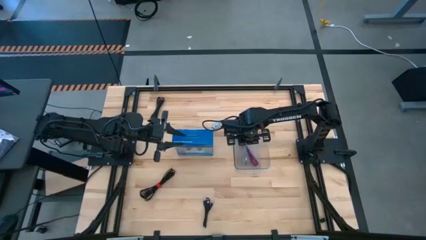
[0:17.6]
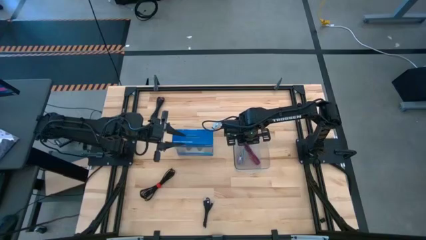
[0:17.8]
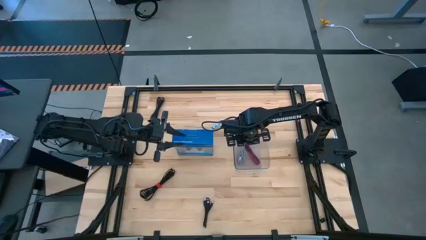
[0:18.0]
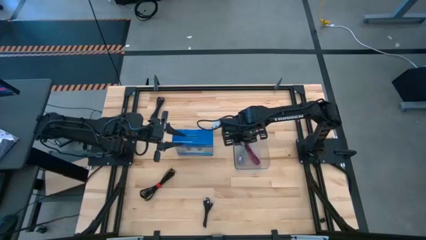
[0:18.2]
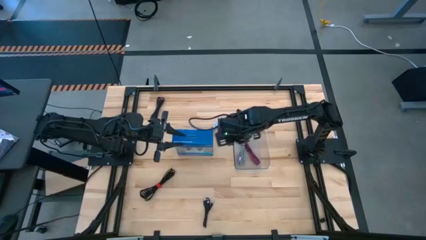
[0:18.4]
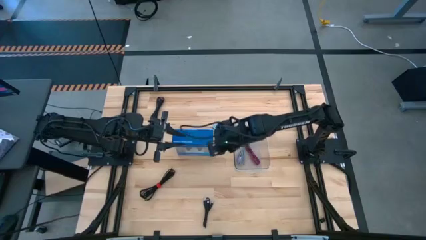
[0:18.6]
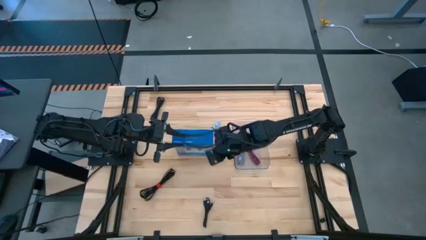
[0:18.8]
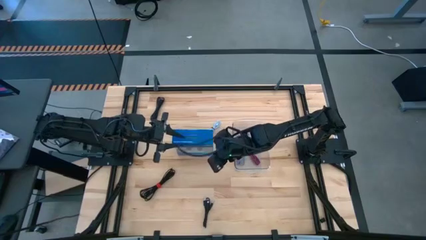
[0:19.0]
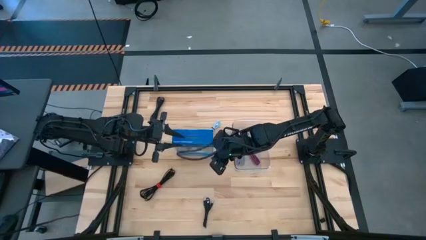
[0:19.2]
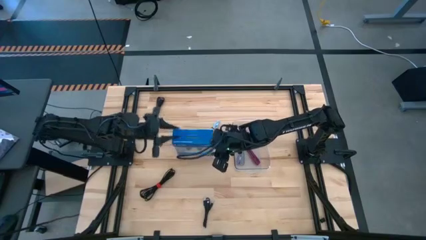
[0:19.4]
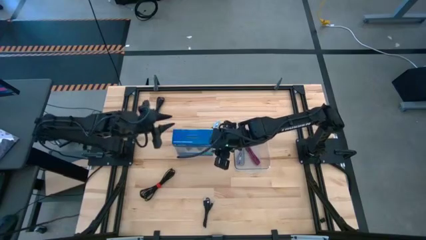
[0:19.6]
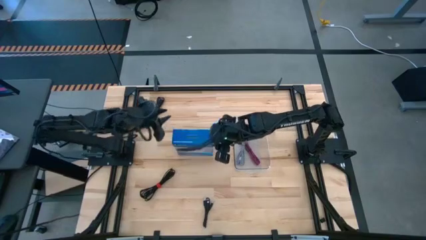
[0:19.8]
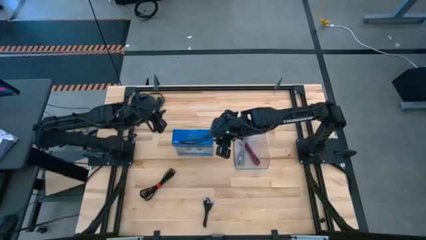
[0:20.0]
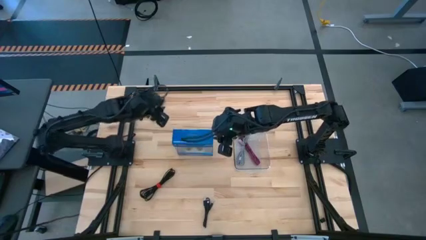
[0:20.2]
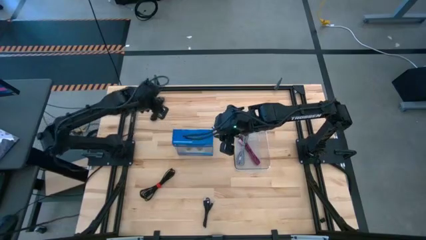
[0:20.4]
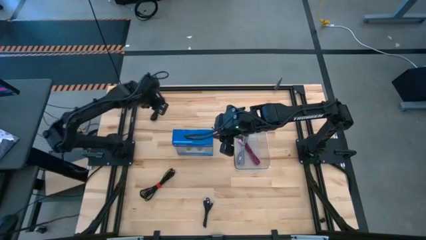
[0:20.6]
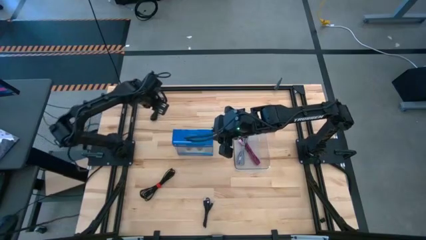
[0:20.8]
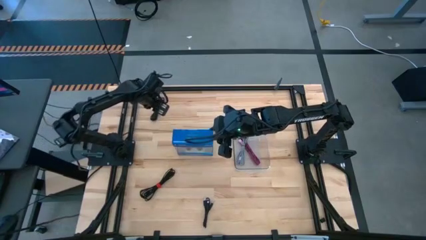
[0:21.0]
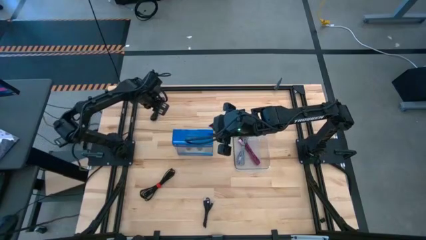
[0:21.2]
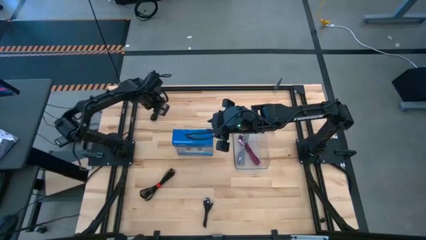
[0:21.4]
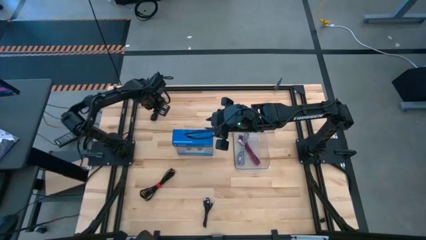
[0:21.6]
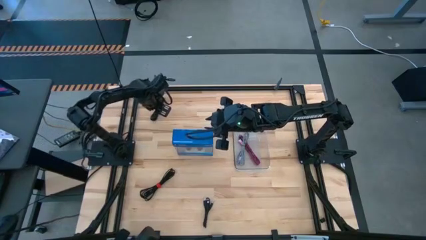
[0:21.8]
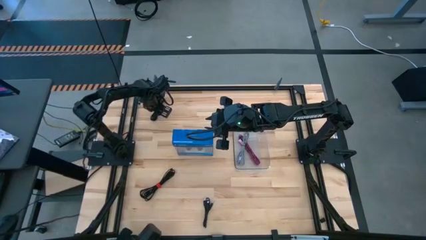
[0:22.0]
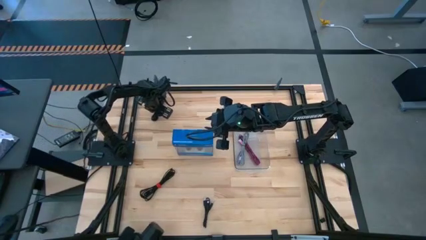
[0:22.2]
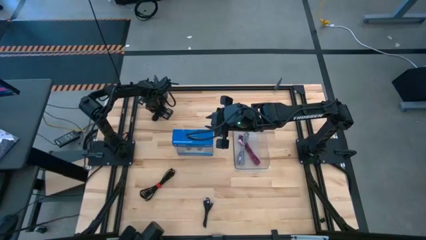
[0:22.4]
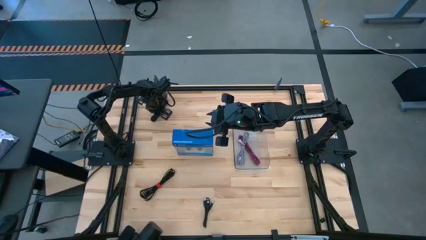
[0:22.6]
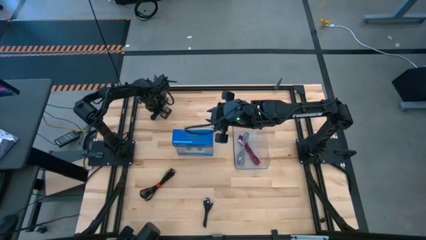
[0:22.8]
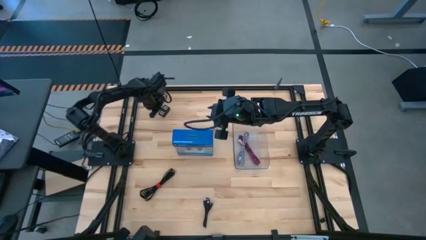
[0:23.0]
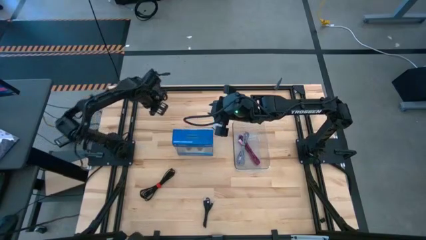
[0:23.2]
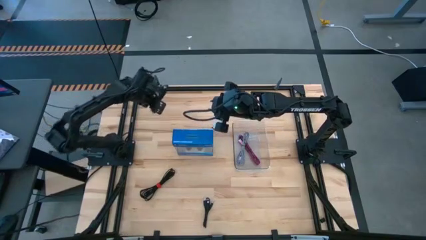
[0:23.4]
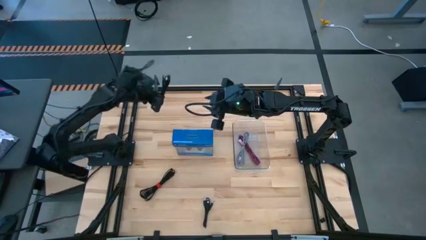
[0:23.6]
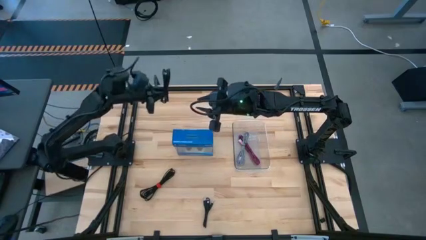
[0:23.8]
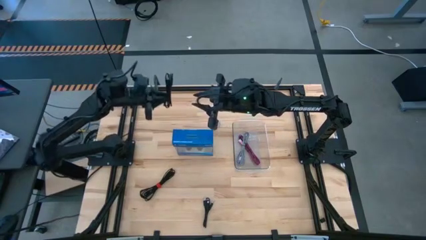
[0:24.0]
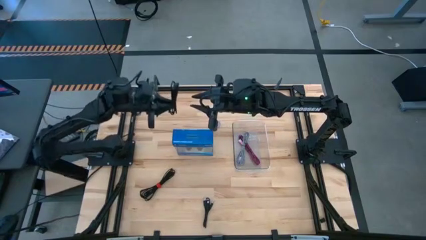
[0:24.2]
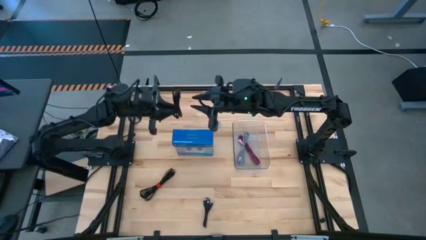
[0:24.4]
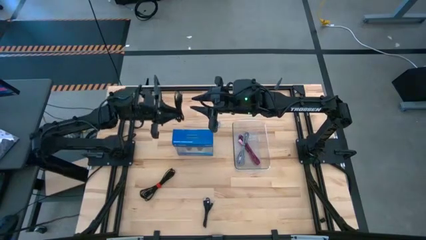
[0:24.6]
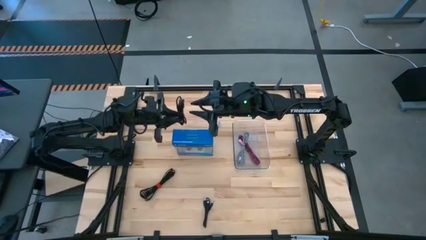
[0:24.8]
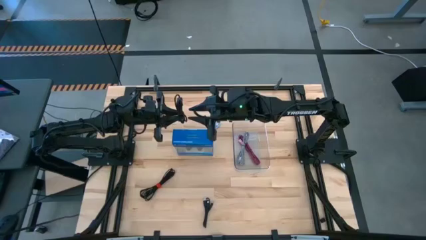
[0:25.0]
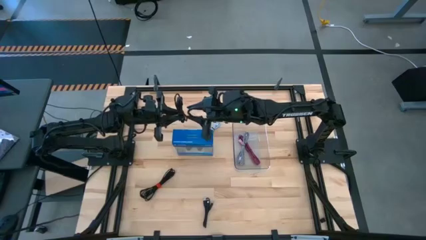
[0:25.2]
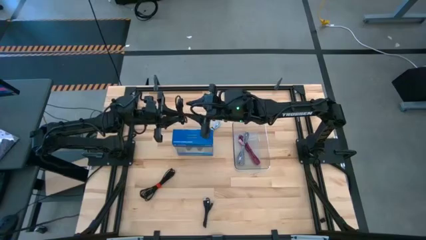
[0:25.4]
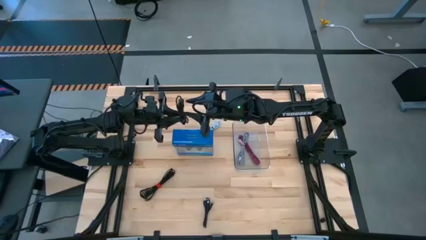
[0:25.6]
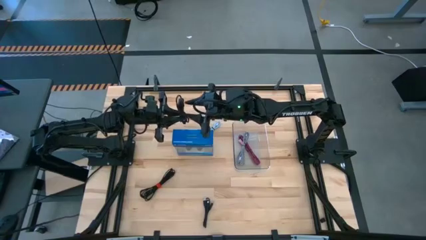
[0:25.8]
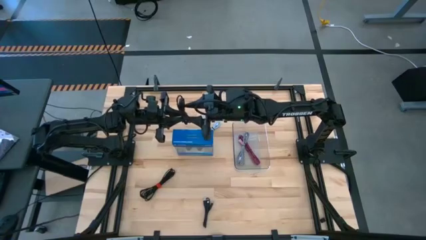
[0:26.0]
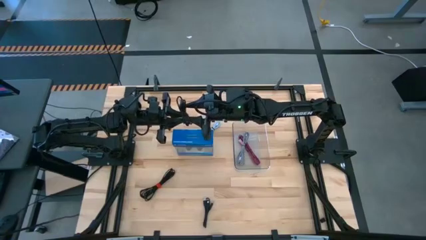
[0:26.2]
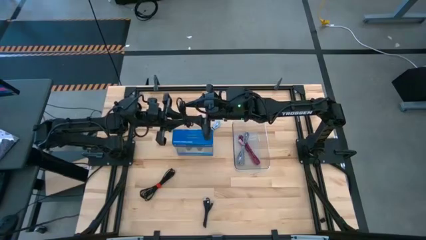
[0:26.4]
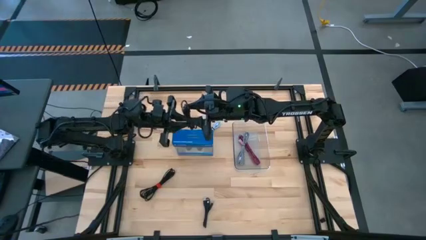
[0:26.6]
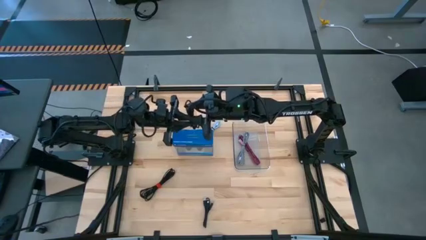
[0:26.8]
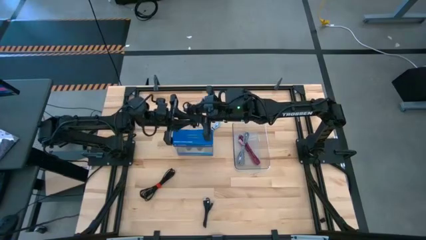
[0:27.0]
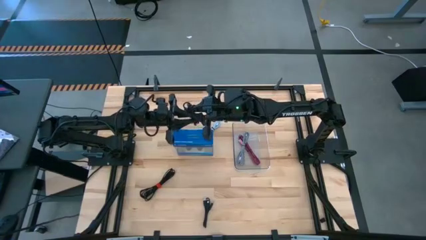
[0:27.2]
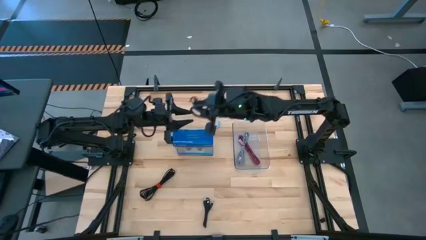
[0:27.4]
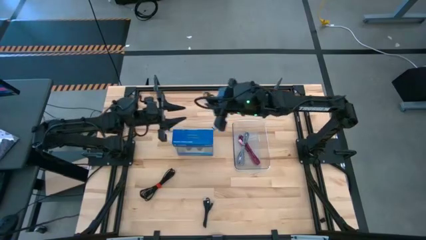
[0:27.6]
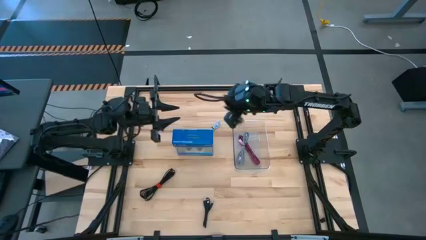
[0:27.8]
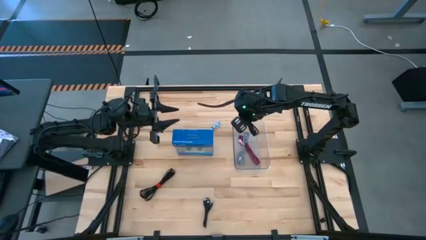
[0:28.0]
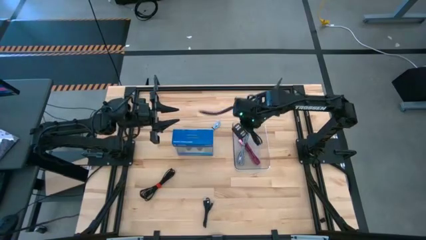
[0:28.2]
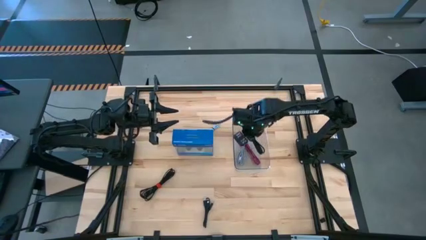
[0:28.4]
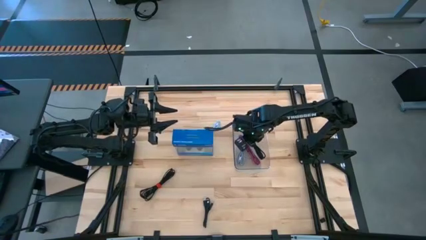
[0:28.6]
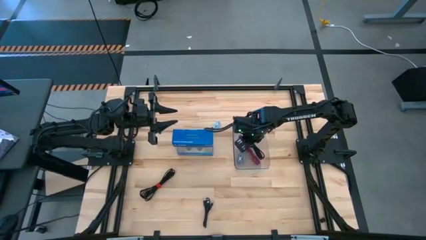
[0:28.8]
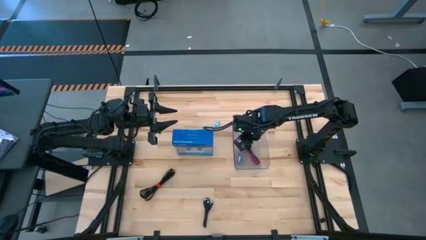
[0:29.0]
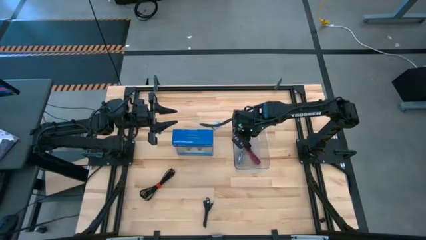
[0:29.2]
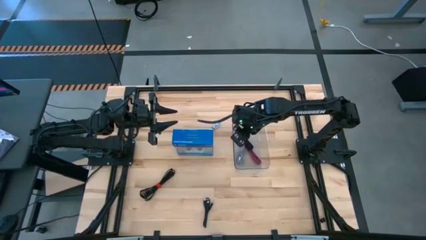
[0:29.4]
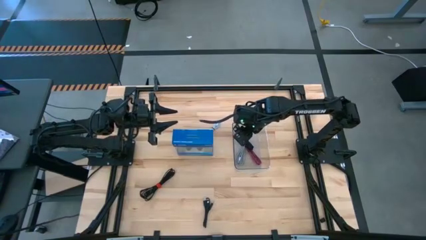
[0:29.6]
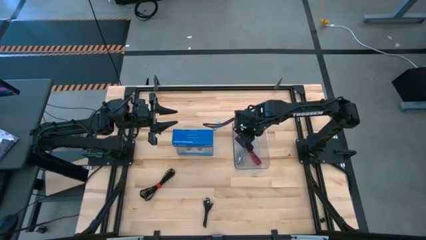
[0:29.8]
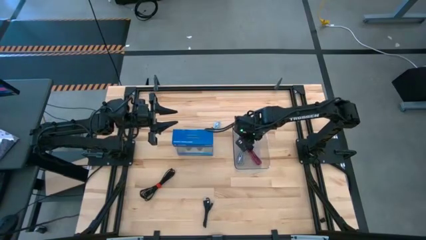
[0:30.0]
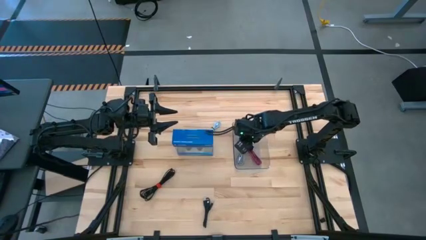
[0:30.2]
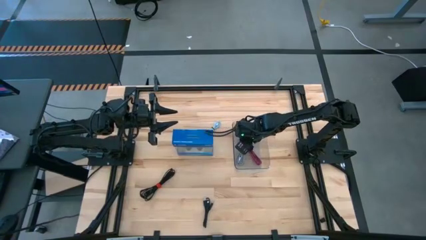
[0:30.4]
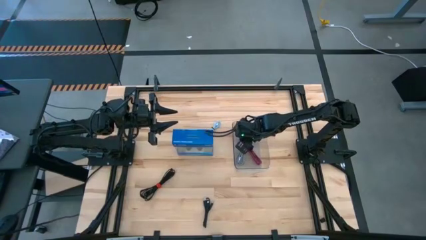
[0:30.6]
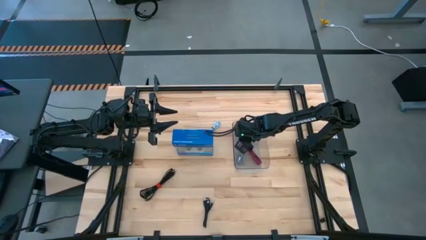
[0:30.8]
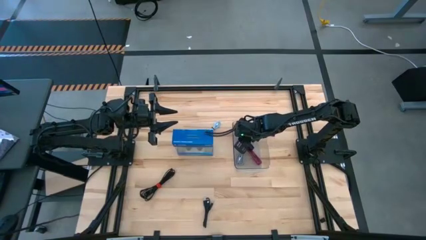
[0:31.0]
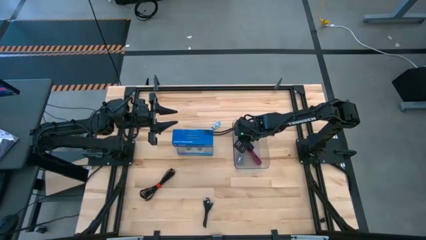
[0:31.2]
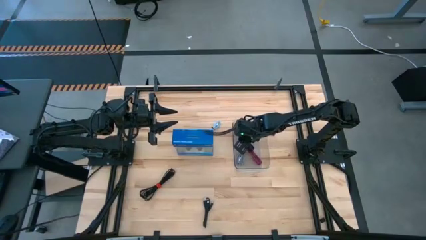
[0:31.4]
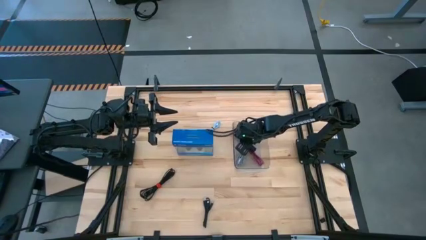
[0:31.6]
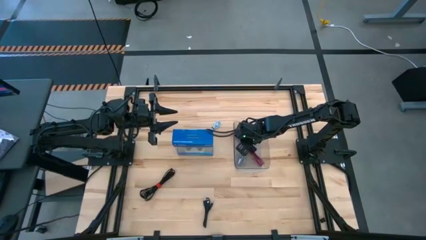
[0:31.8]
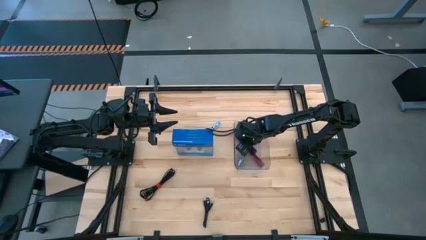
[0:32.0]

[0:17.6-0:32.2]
Task: Pick and place USB-C Cables
Put the top black charger cable into the transparent bin

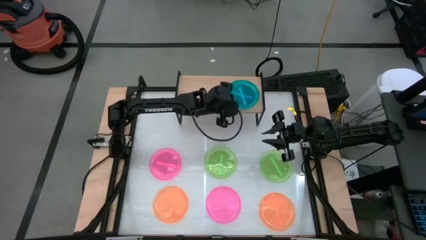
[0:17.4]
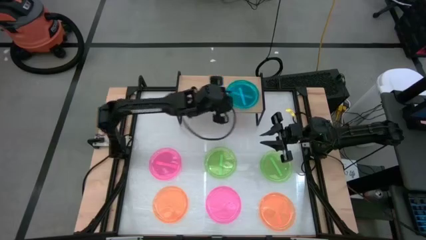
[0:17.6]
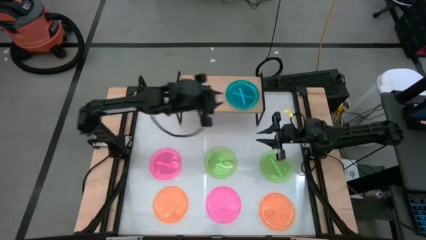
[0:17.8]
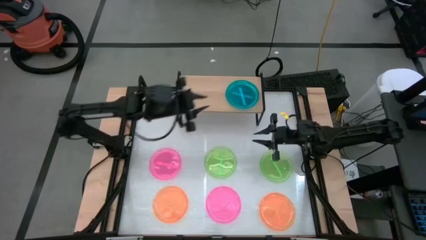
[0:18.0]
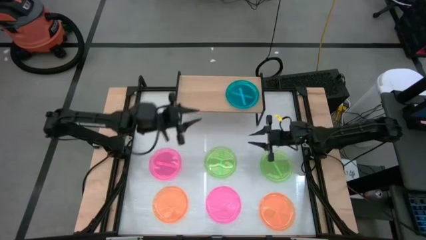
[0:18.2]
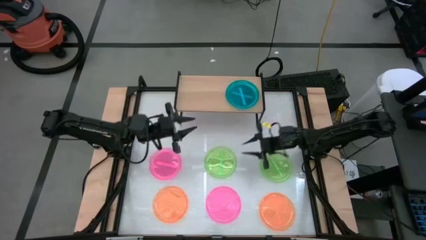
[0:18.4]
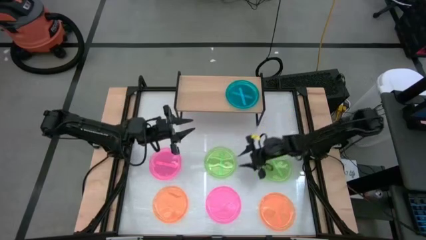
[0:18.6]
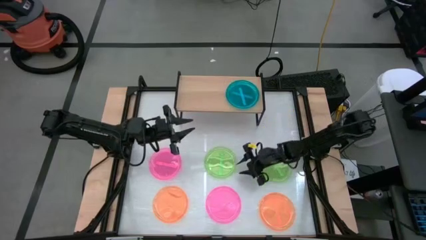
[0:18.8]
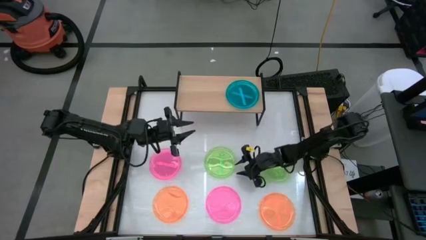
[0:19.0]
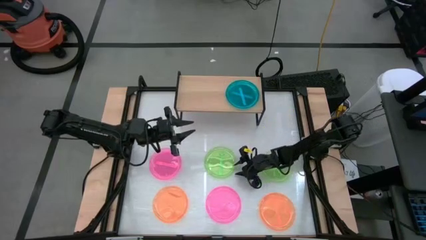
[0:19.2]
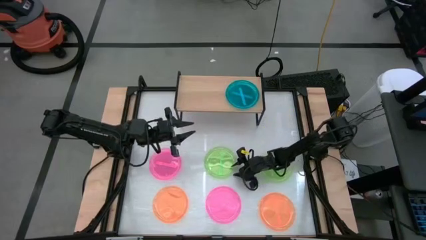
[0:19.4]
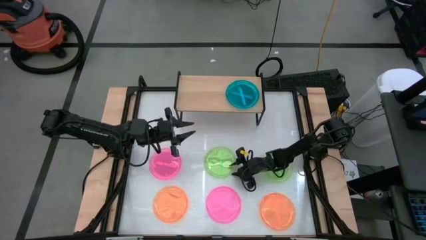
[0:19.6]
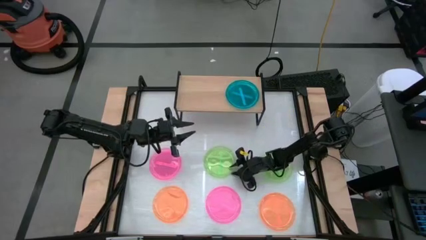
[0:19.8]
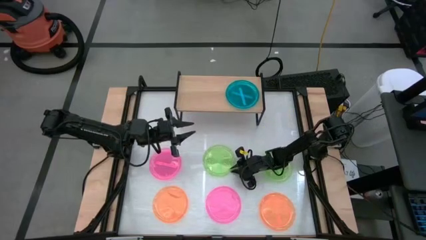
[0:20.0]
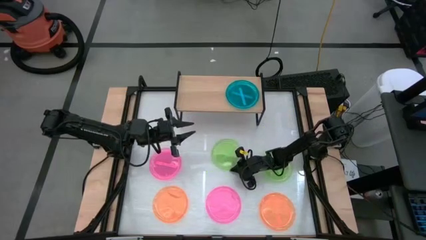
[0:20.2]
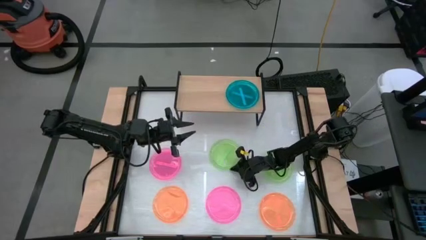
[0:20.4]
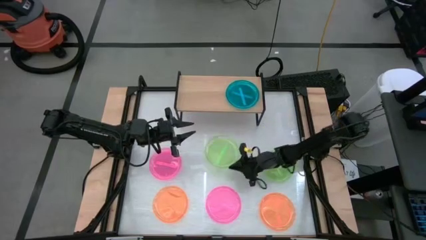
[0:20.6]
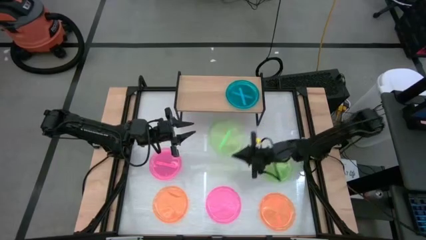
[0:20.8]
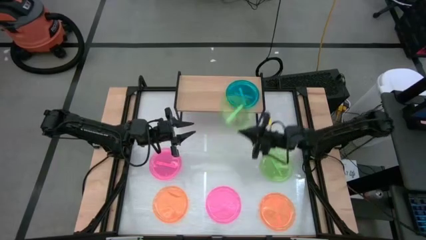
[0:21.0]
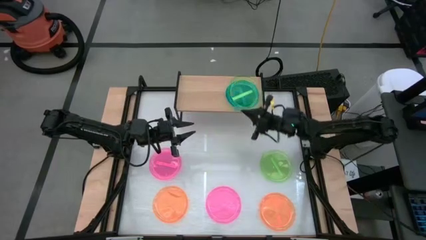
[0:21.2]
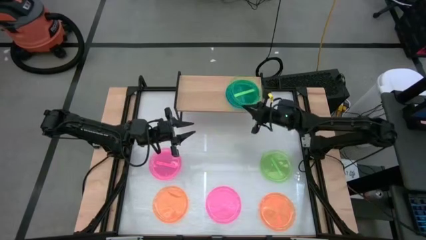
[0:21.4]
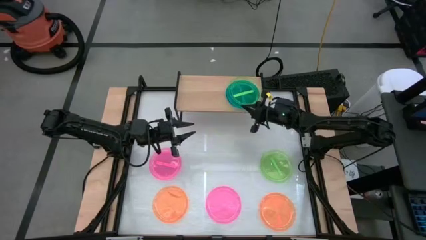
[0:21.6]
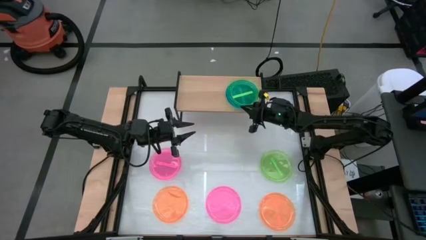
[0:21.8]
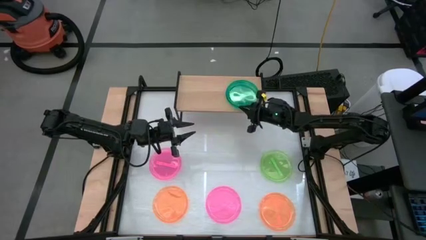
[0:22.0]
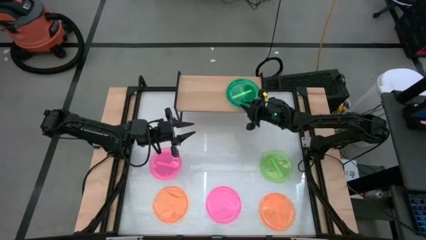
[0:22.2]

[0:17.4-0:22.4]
Task: Place and stack plates onto a shelf
Stack the left green plate on the blue plate on the shelf
